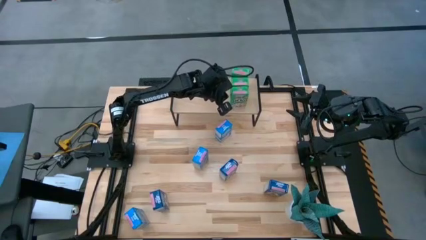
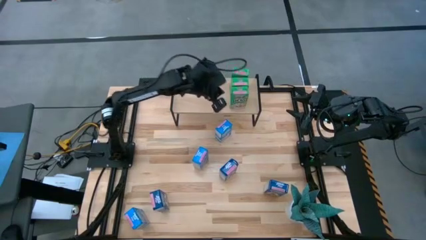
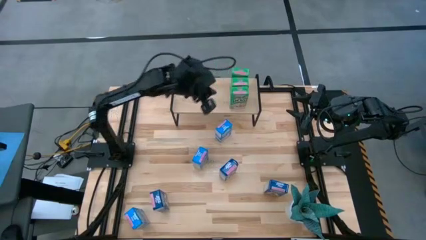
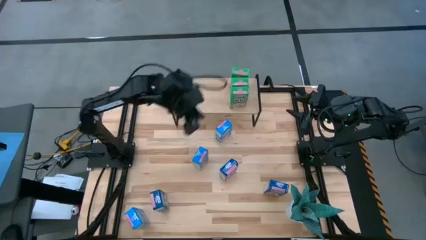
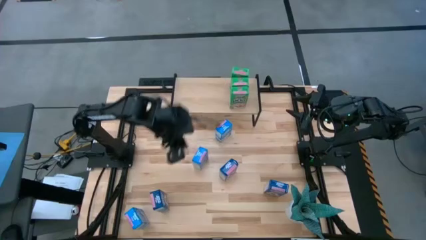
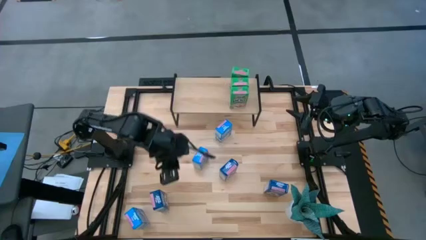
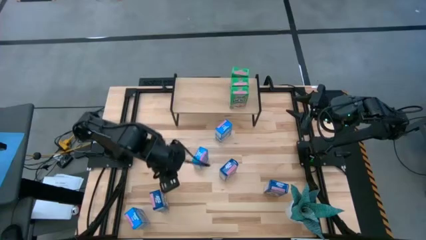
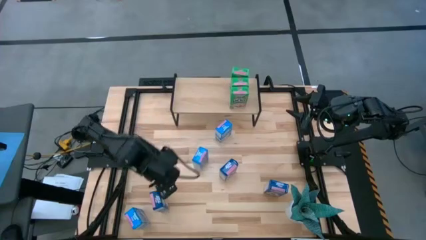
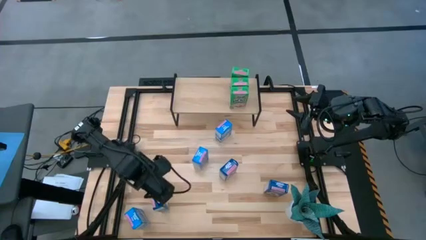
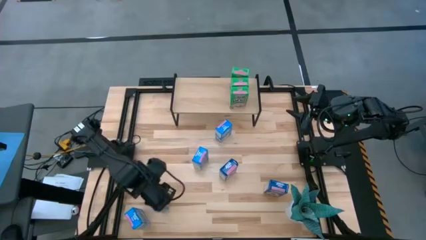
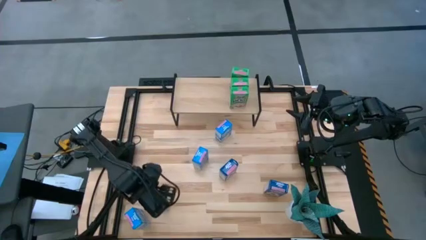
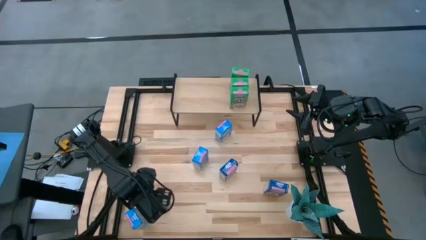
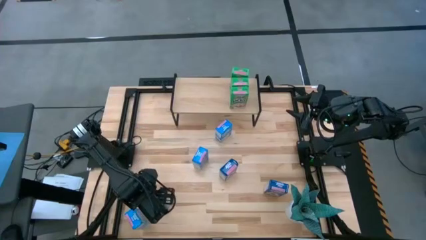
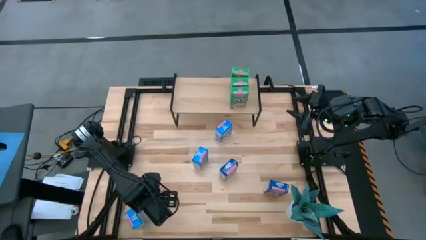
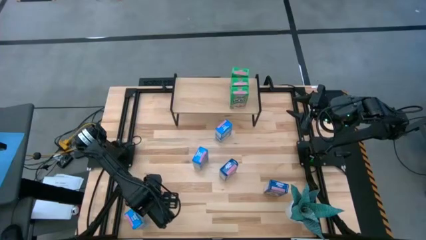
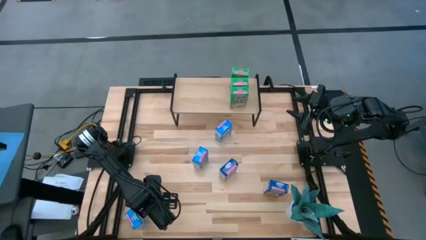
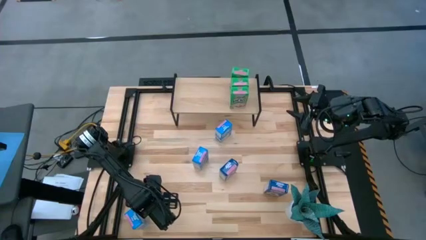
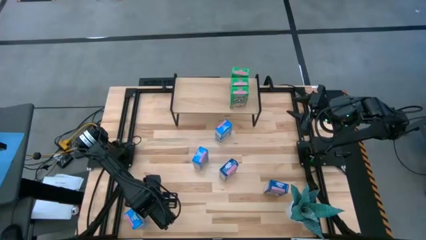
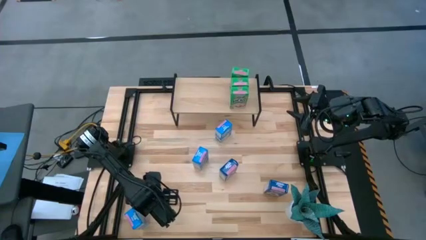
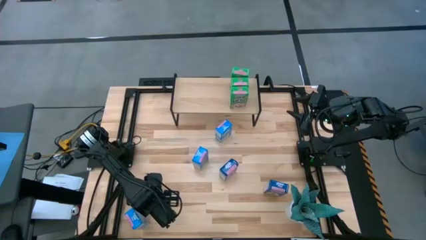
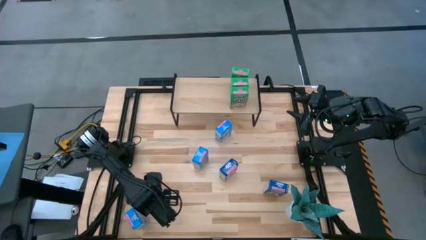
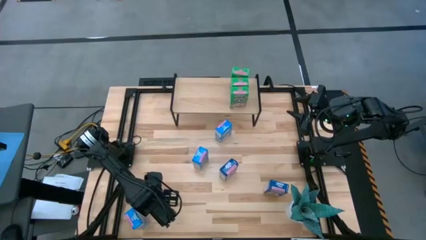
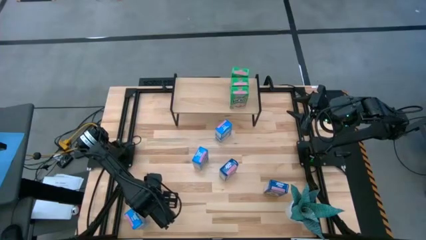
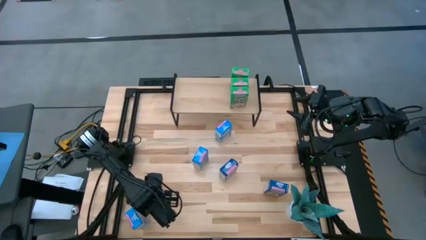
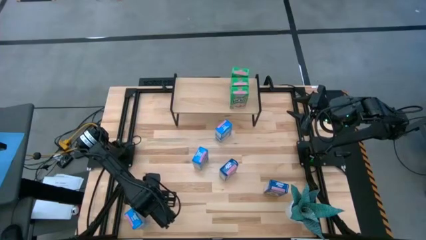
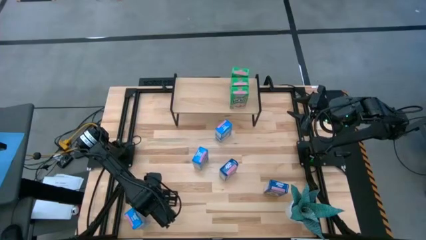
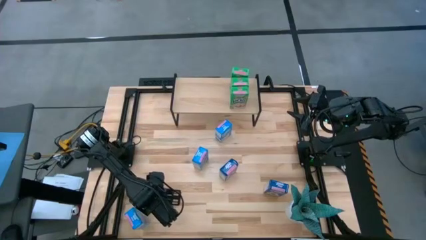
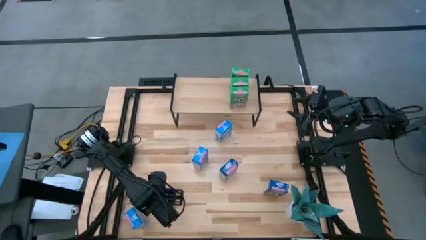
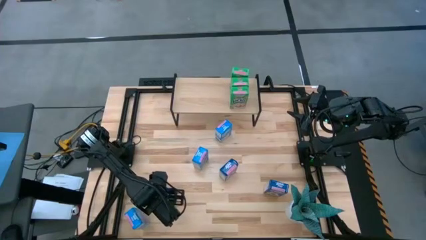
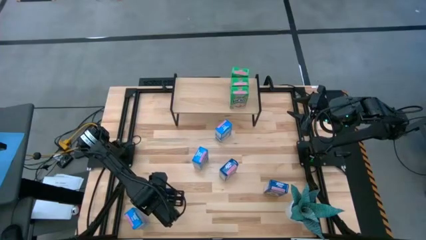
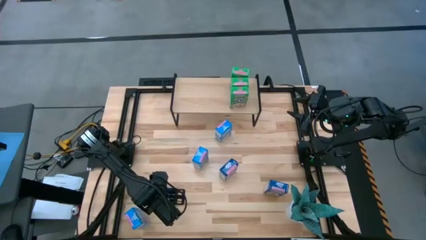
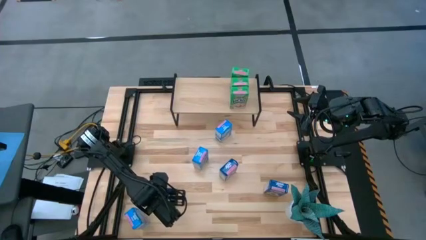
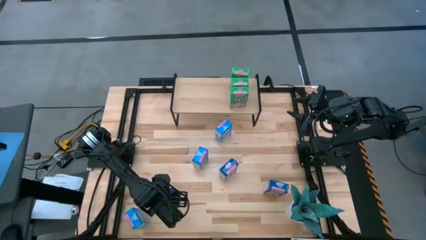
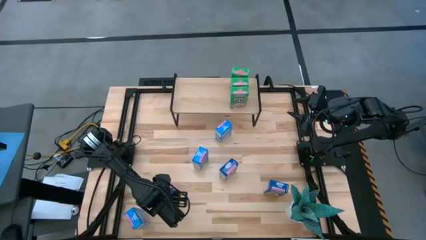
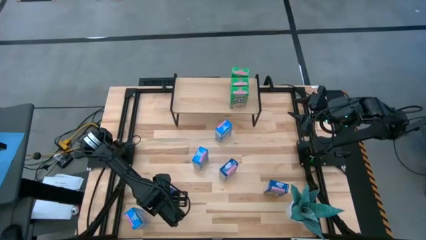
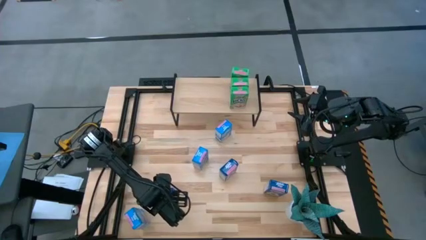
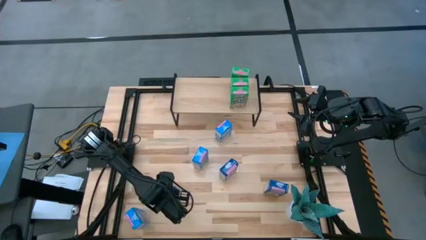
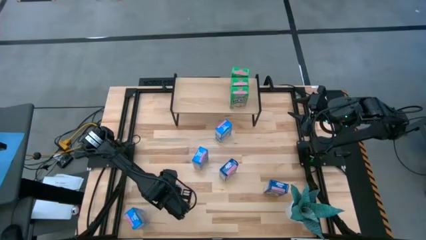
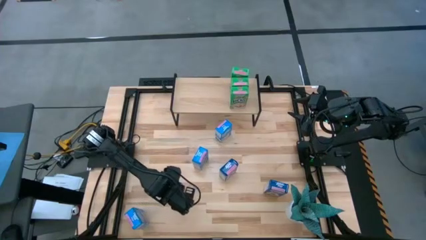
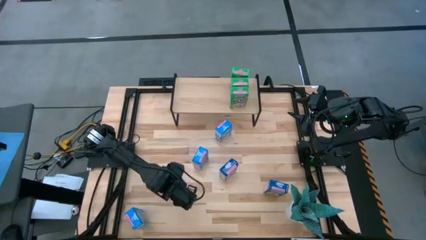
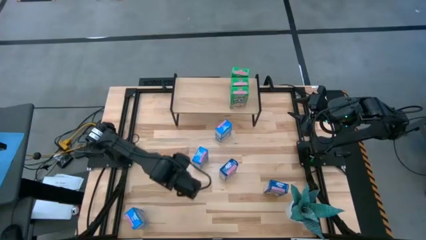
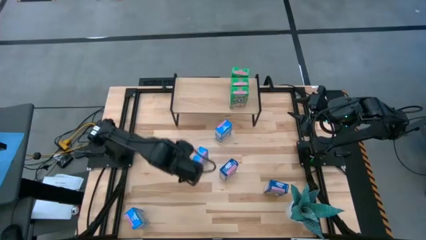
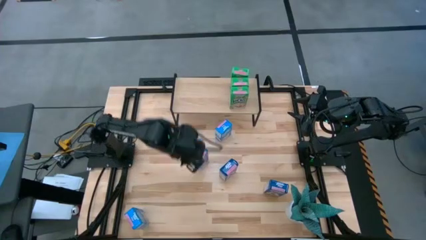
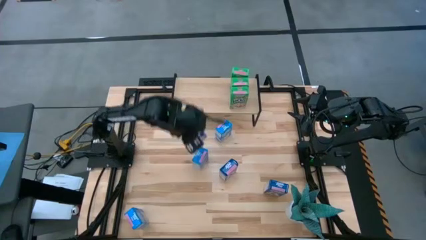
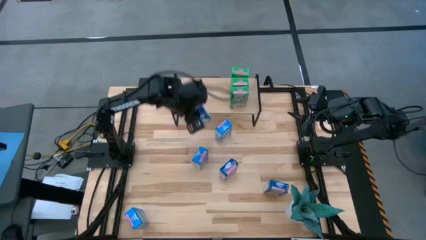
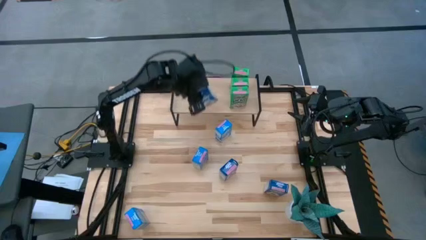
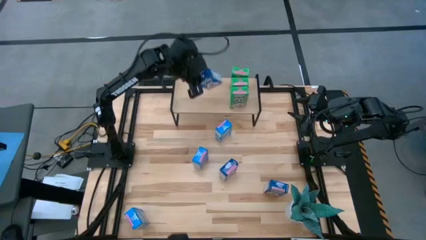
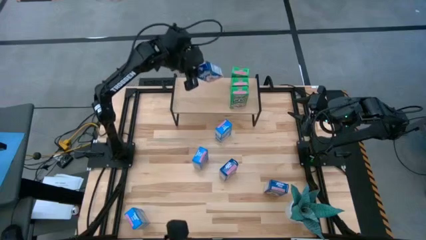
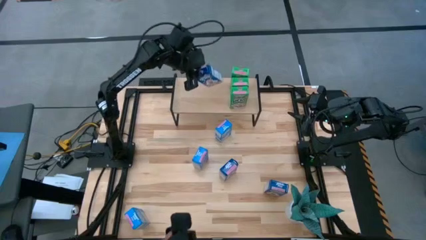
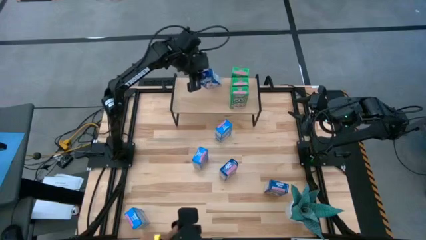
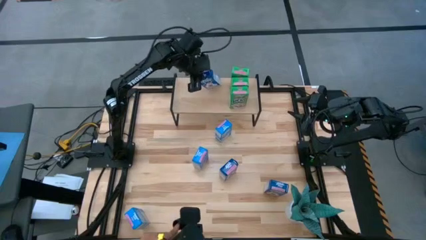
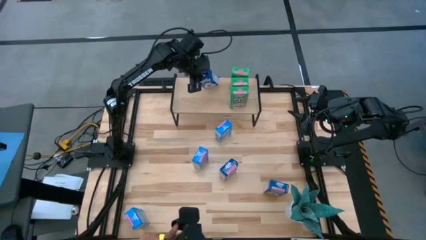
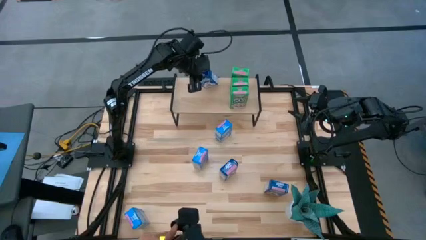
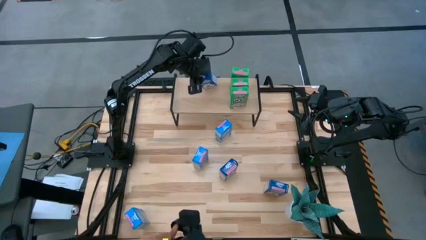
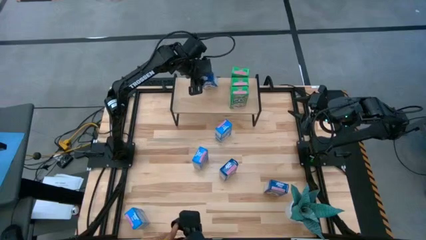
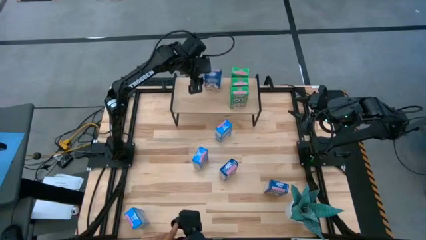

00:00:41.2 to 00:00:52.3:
Task: Stack cereal on shelf
Put the bottom left blue cereal box on the shelf
